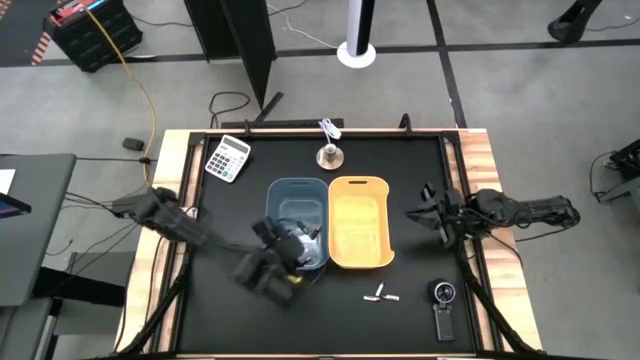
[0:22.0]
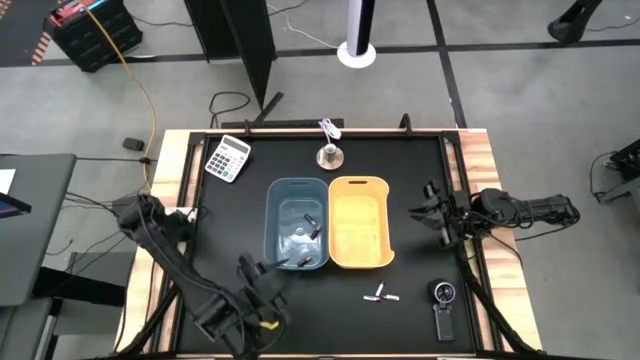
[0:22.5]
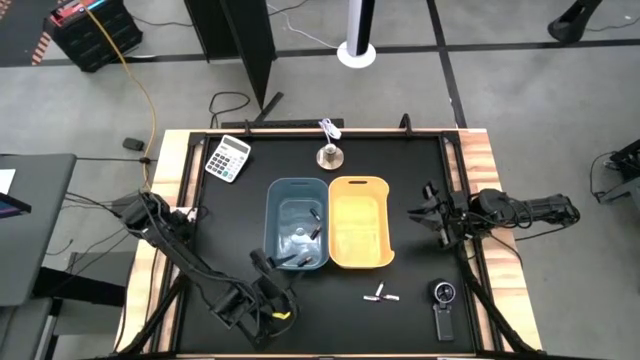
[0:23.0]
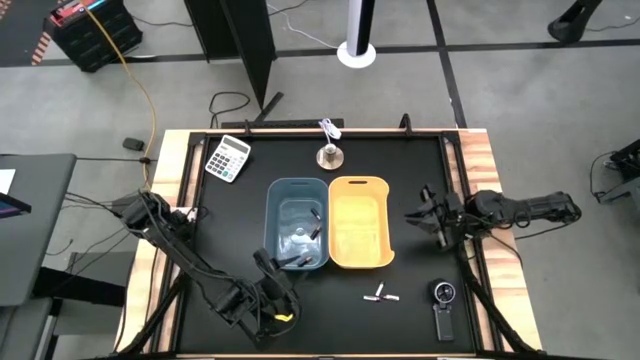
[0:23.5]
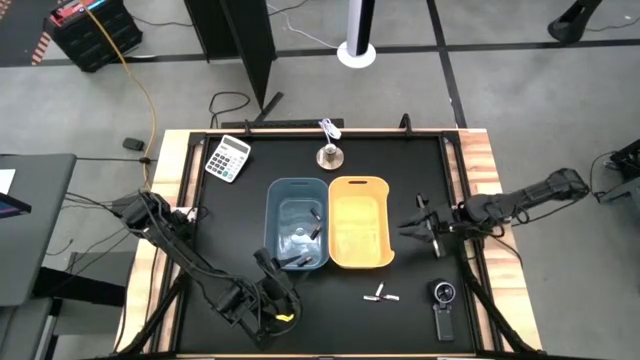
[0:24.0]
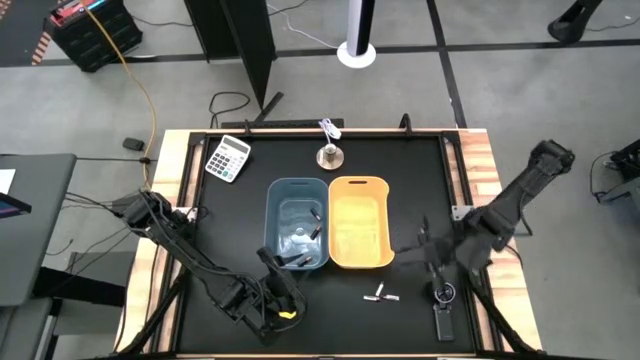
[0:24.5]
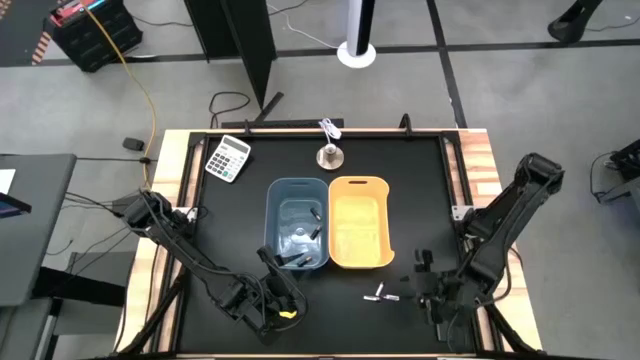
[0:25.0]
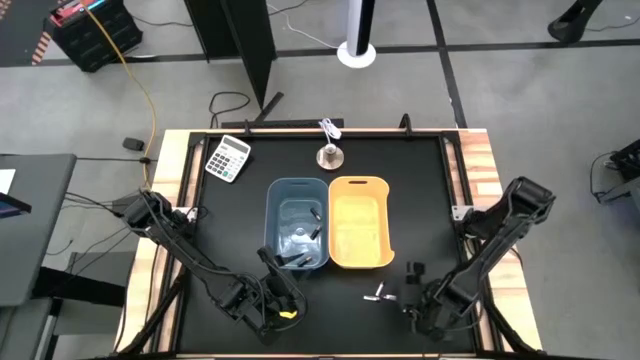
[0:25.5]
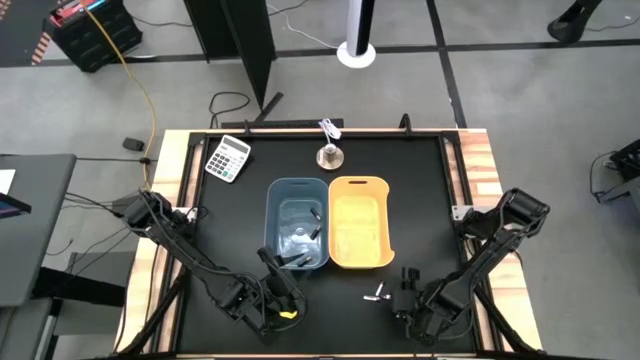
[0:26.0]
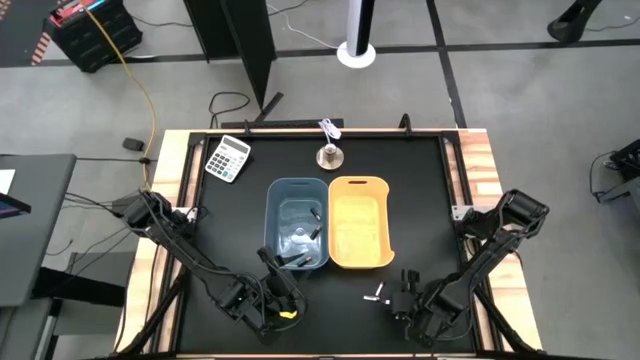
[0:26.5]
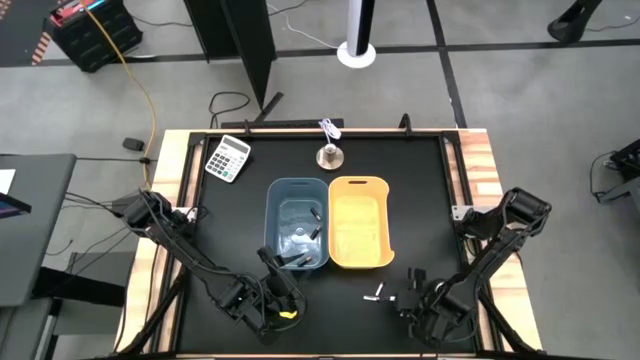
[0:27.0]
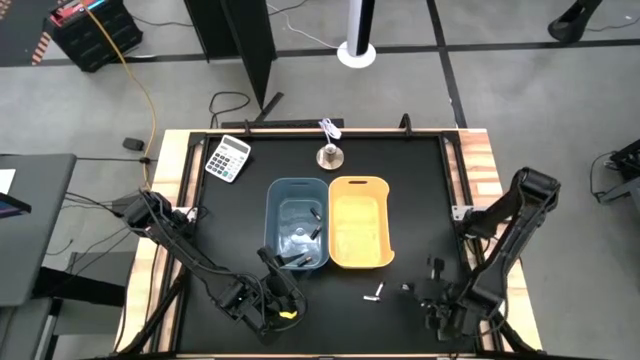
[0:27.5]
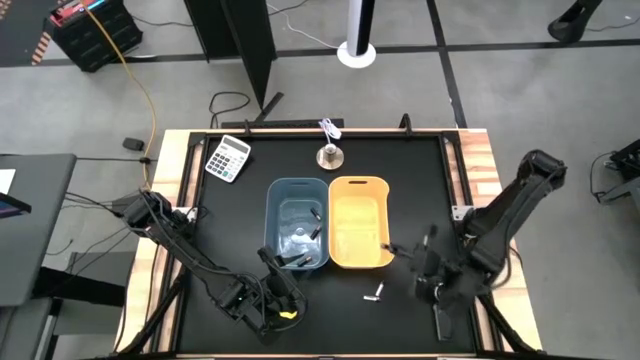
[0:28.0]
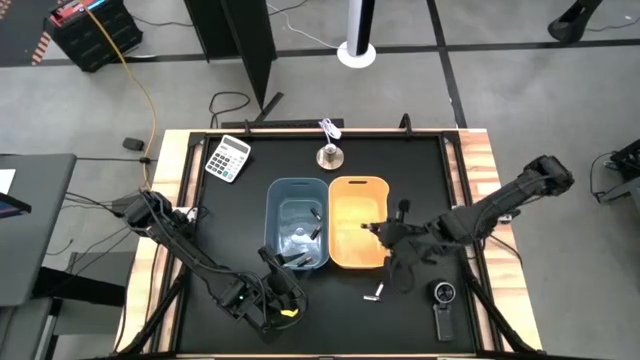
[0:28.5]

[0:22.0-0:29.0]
Task: Sort batteries
Put the right silver battery into the yellow bin

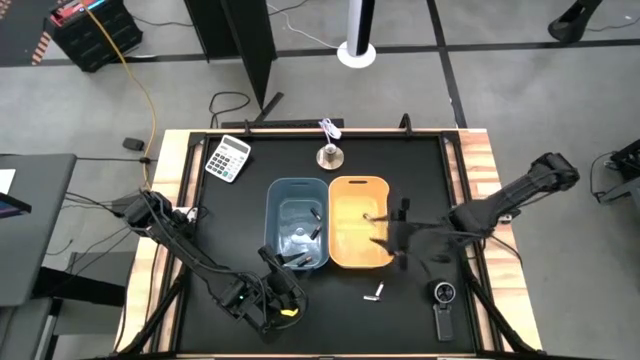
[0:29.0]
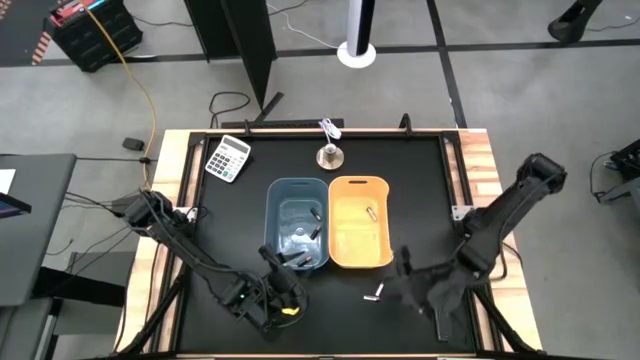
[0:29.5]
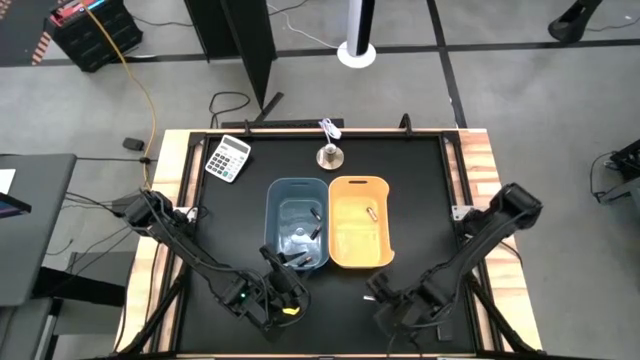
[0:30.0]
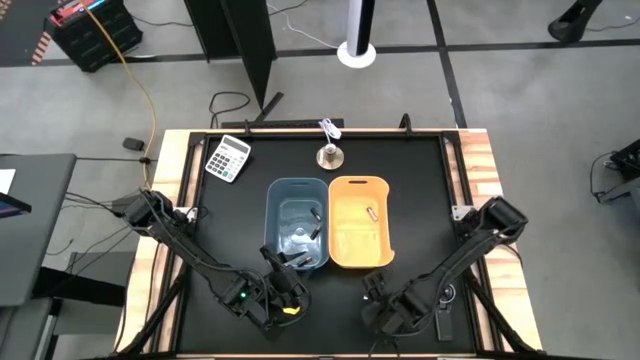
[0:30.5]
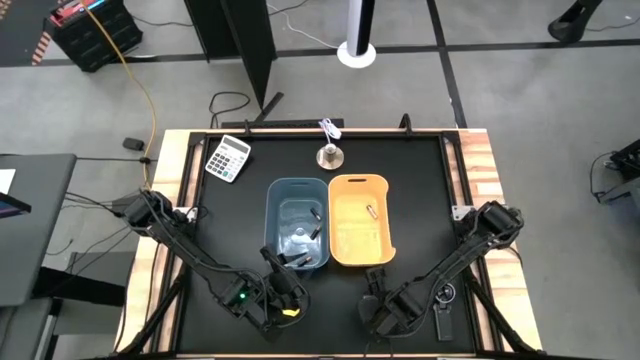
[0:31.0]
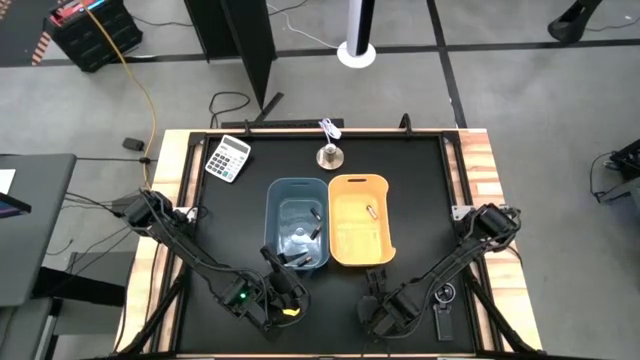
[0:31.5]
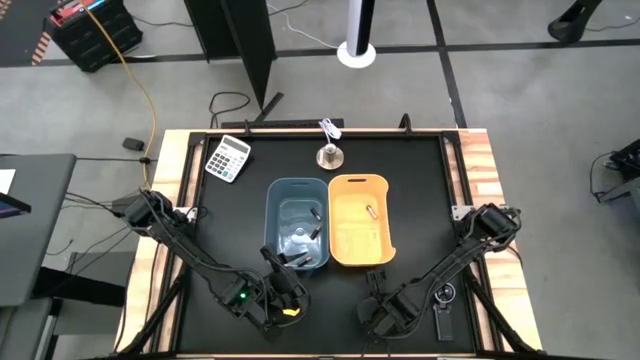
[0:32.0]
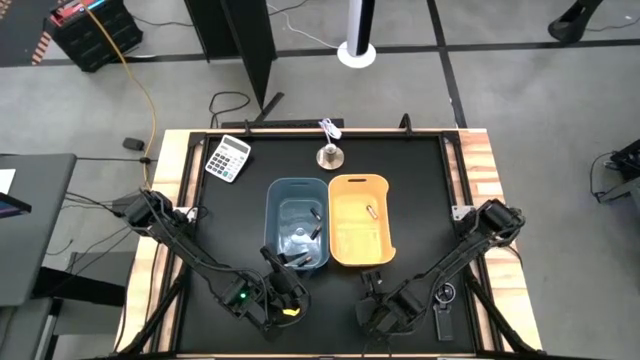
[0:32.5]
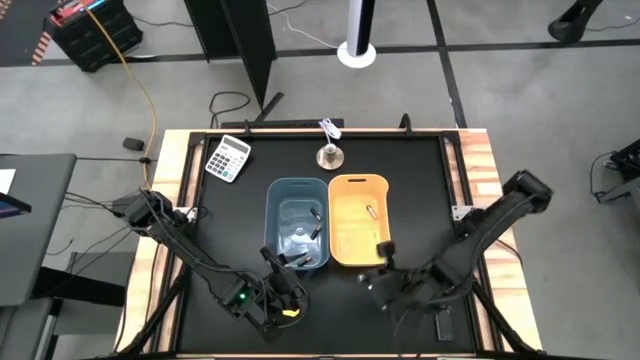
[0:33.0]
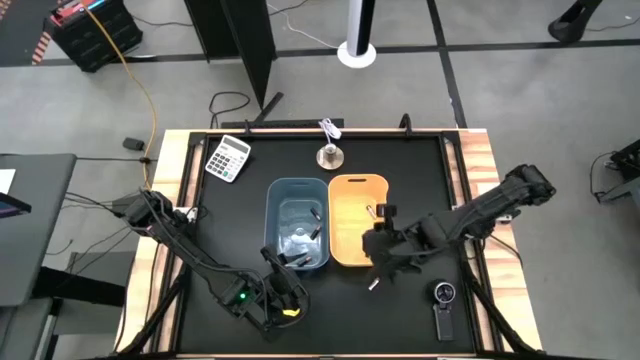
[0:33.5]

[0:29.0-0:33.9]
Put the left silver battery into the yellow bin

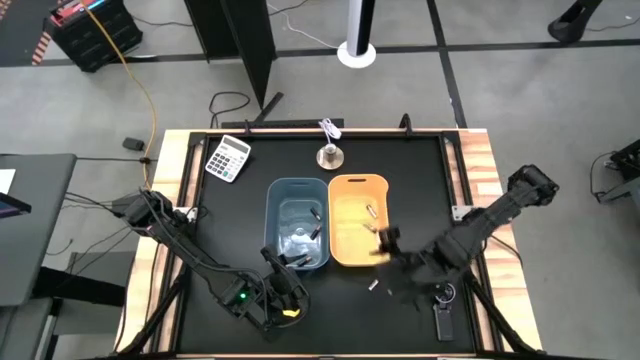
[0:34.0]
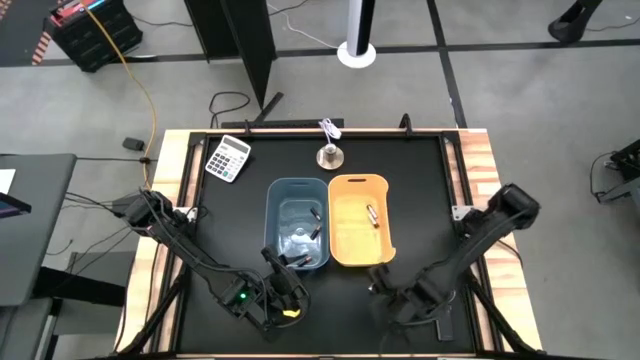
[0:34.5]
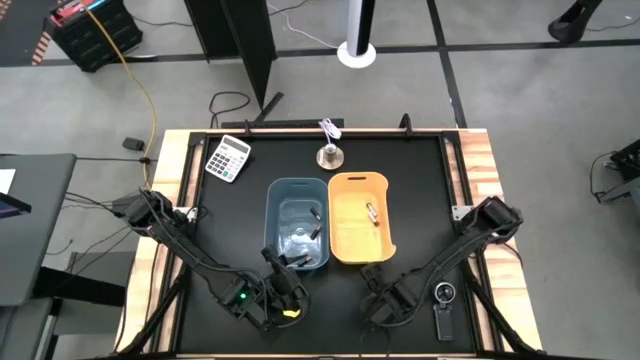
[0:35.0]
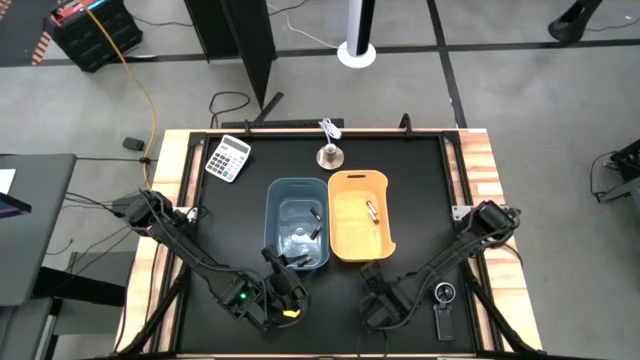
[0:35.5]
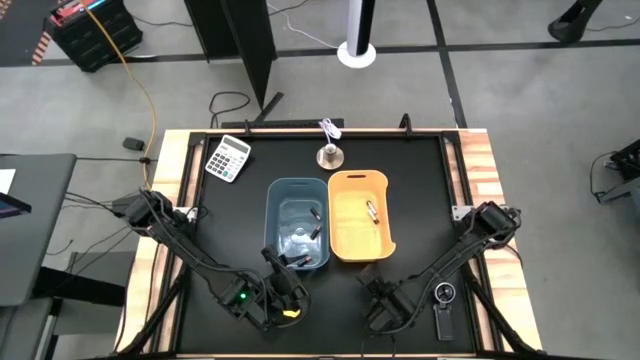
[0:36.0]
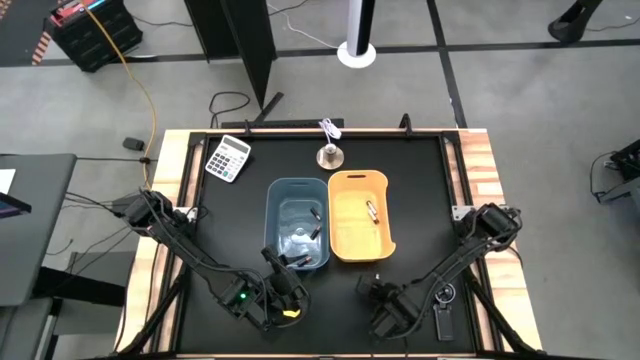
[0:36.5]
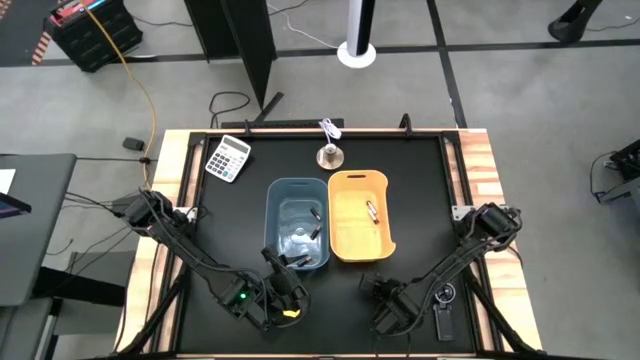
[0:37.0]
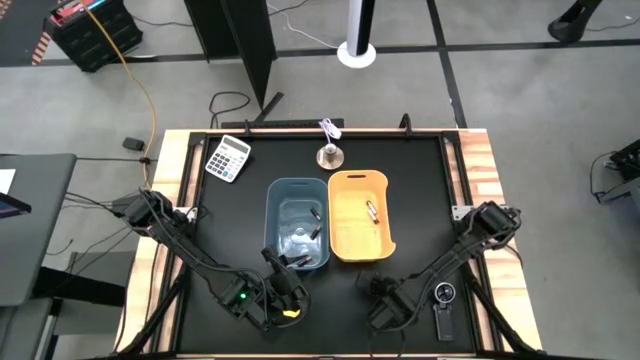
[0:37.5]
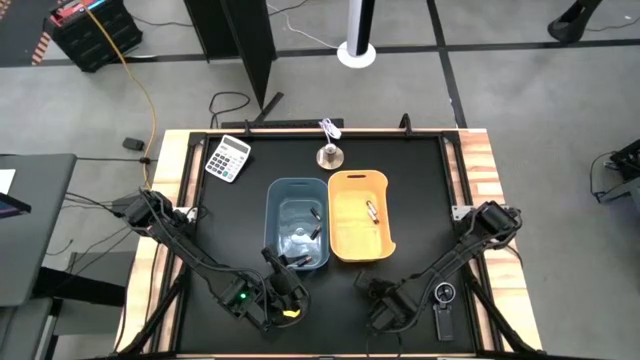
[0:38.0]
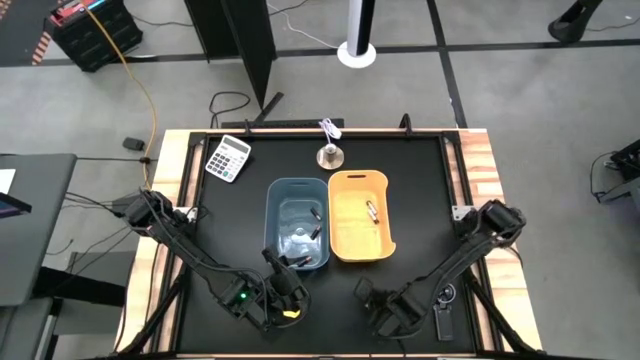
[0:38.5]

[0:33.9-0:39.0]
Put the silver battery into the yellow bin

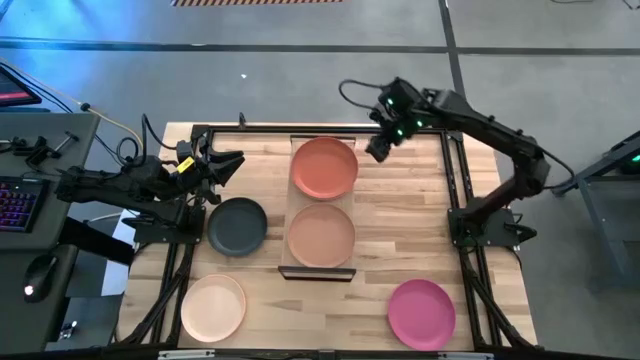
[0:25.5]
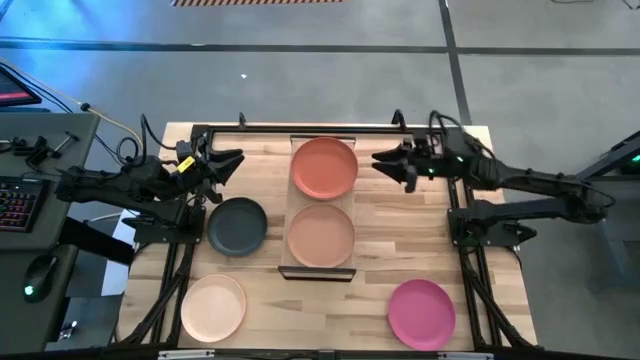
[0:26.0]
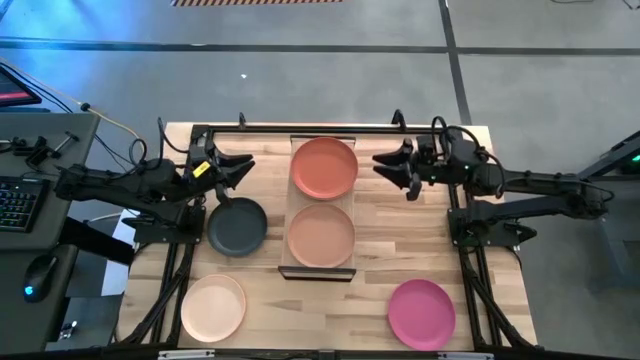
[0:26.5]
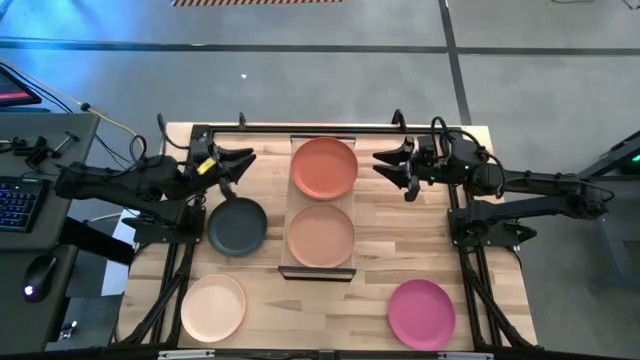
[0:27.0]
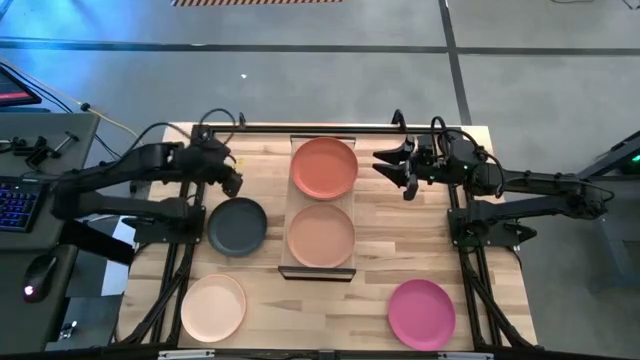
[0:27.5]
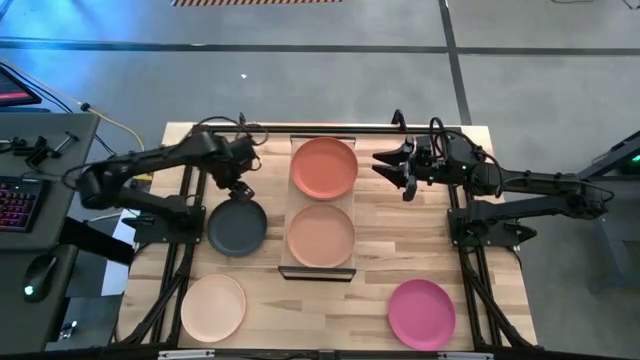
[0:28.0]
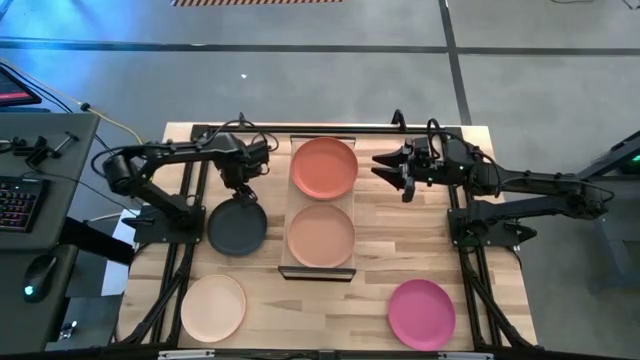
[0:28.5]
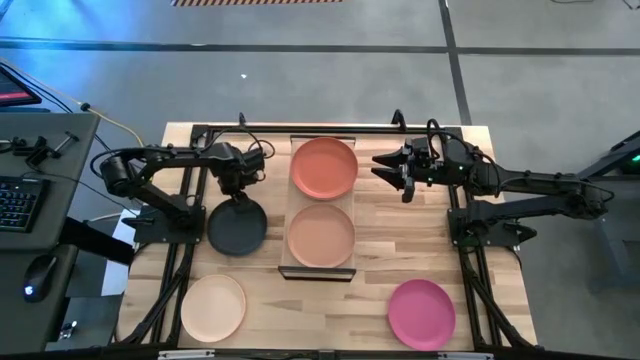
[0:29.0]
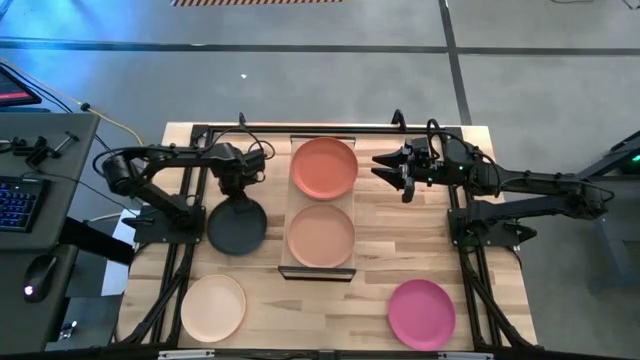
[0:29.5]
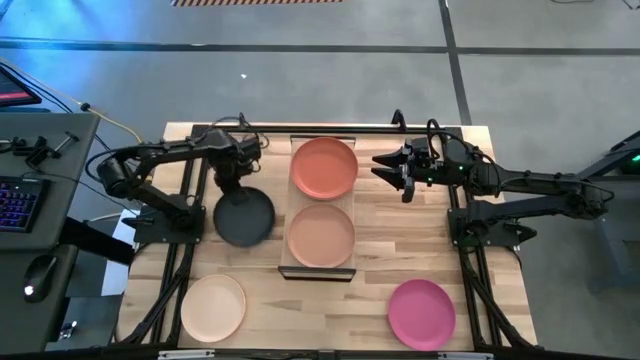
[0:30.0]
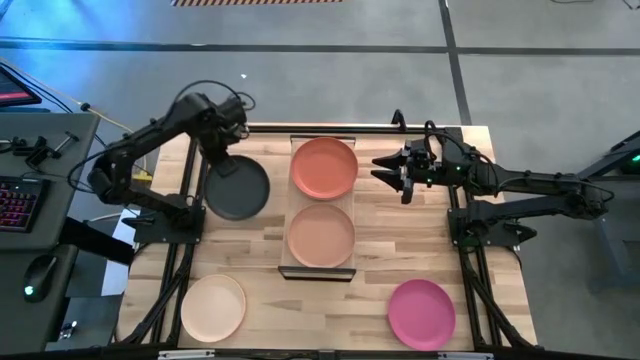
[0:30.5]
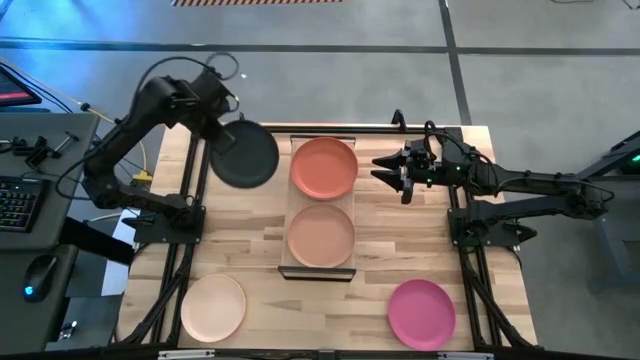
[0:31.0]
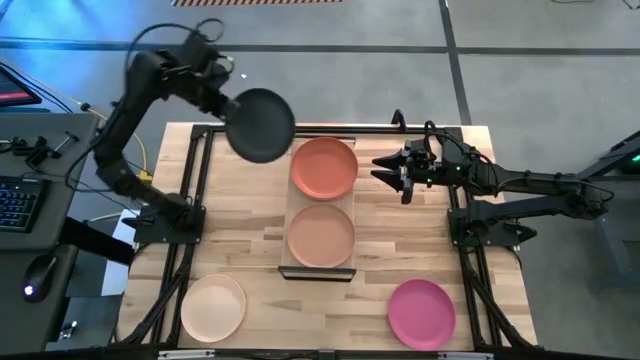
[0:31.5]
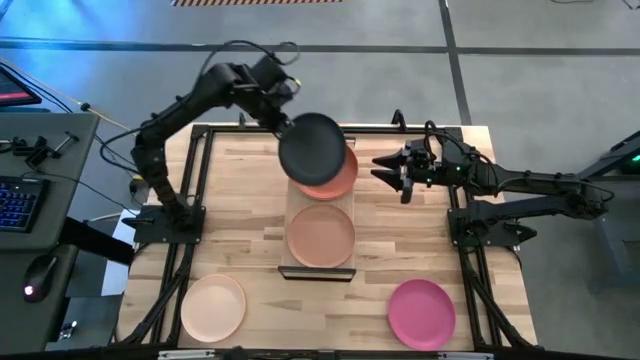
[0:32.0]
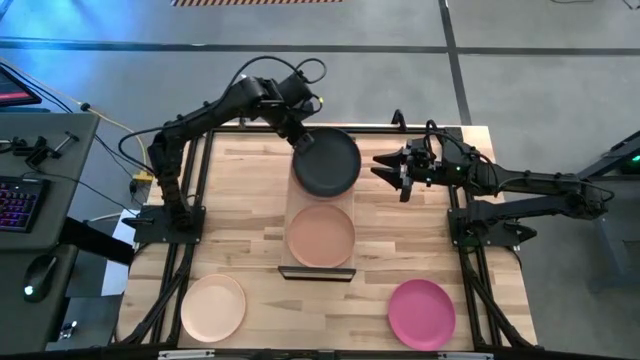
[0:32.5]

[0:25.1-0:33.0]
Task: Place and stack plates onto a shelf
Stack the black plate on top of the orange plate on the shelf
